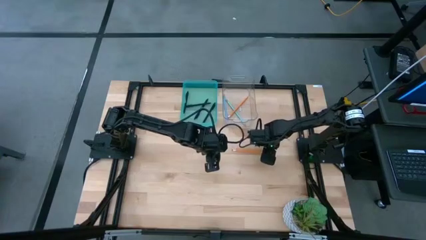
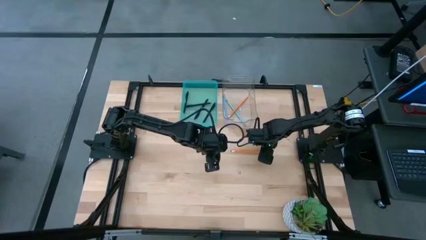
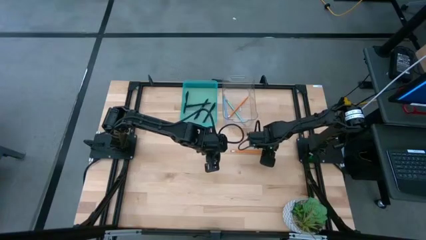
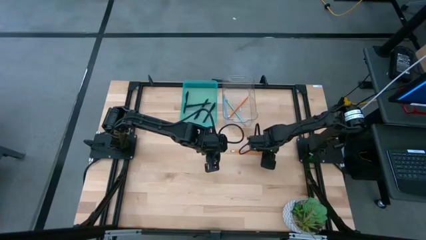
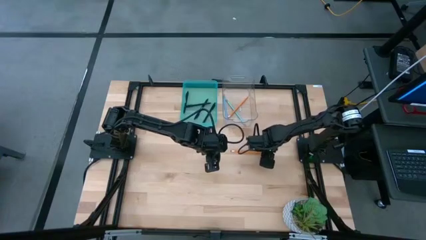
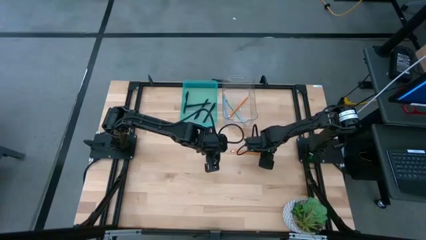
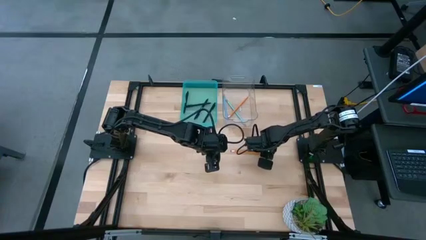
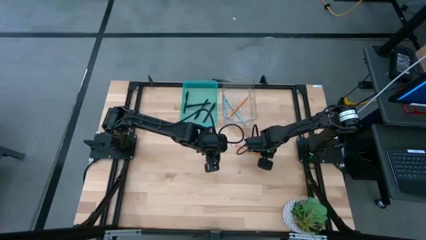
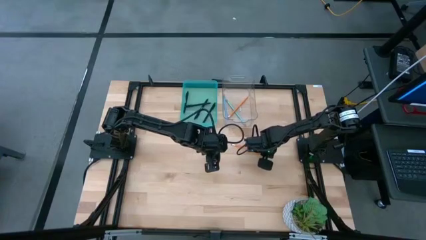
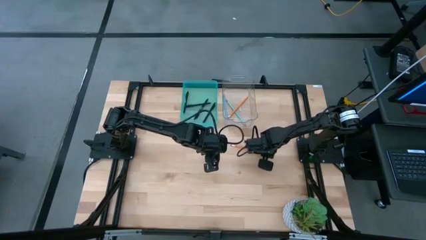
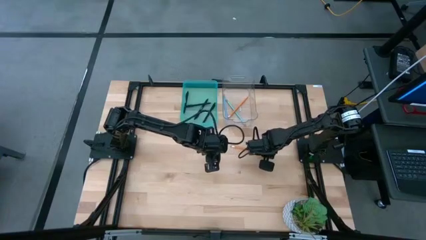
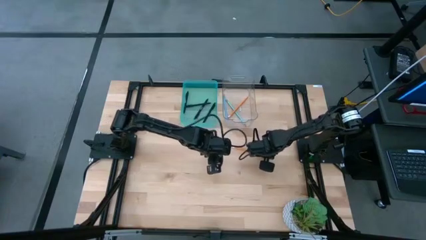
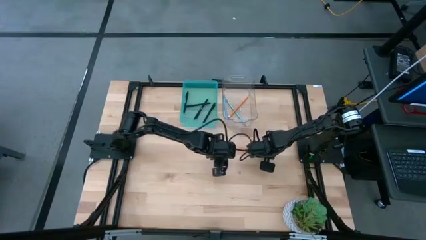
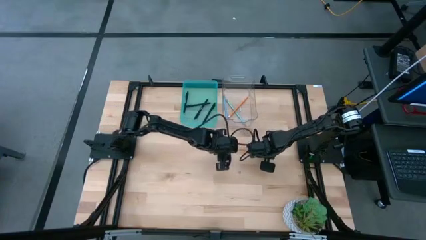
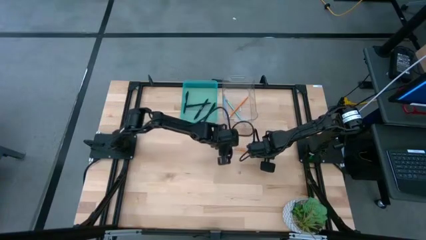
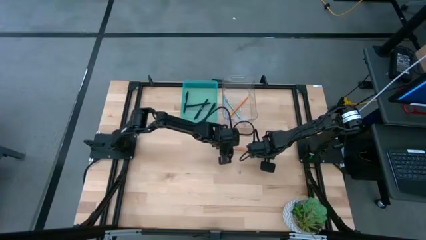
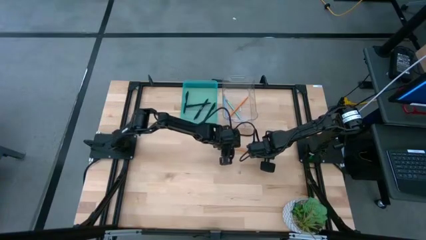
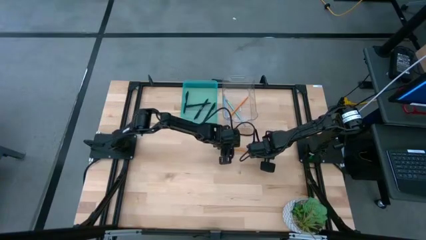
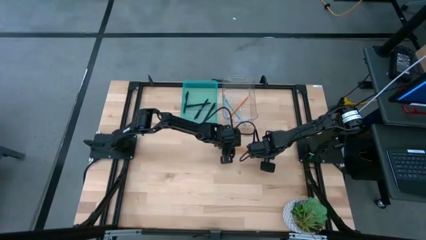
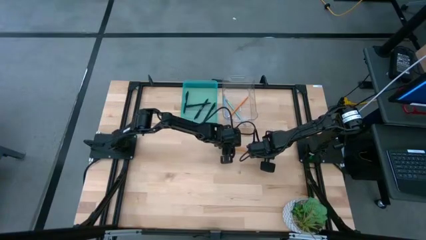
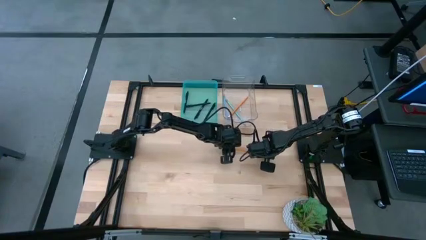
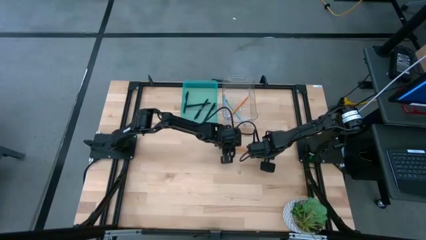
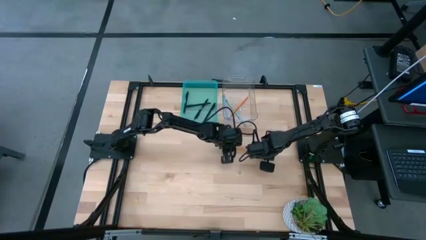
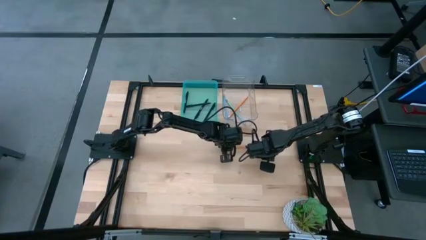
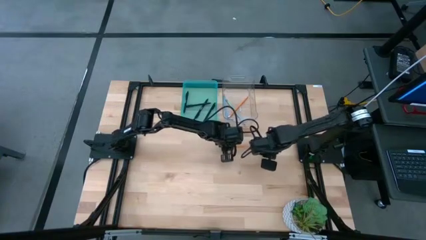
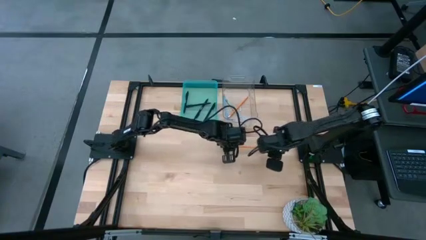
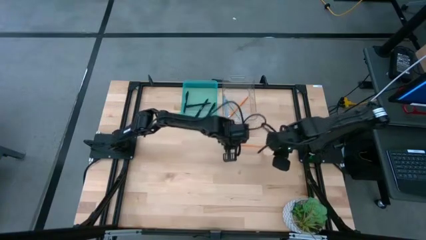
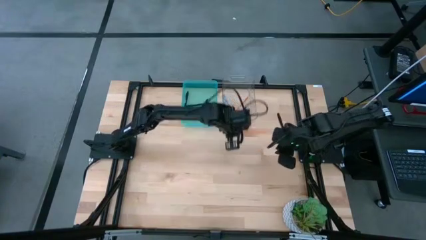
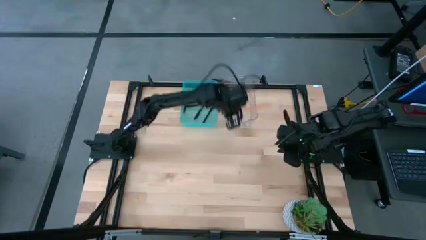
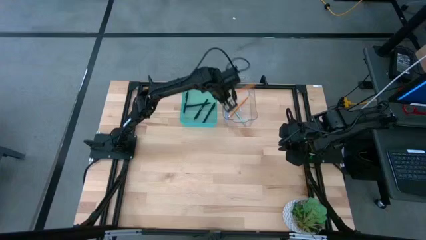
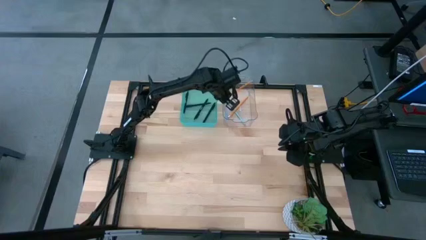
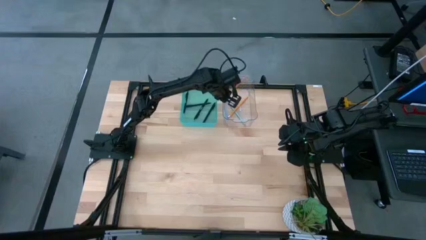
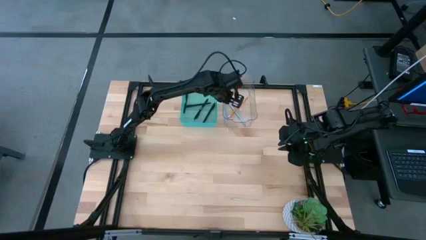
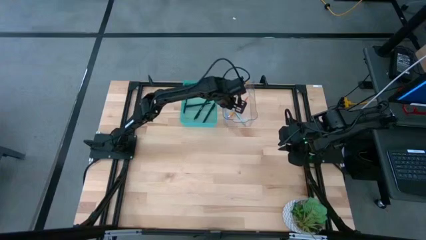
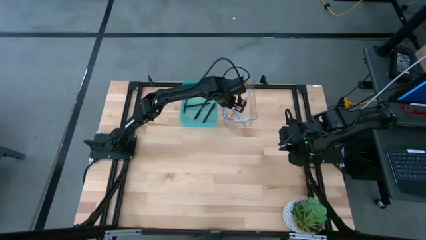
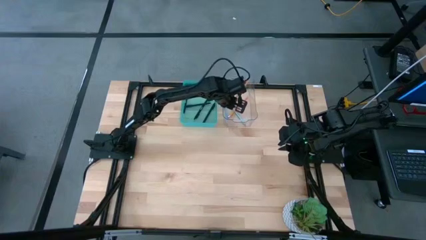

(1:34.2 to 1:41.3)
Task: Sort pens & pencils
Put the yellow pencil into the transparent bin

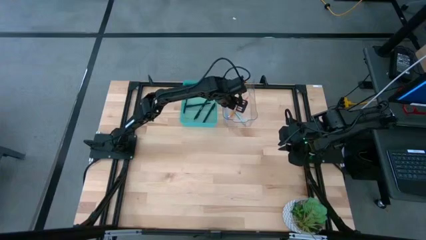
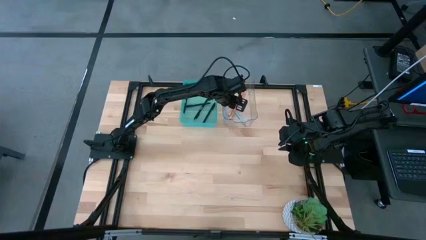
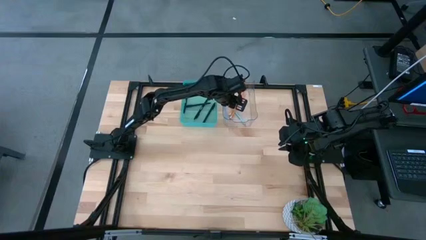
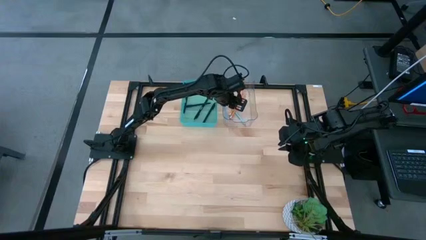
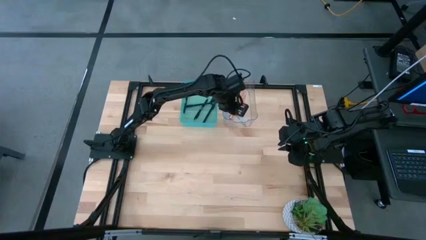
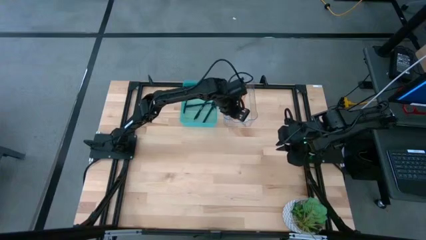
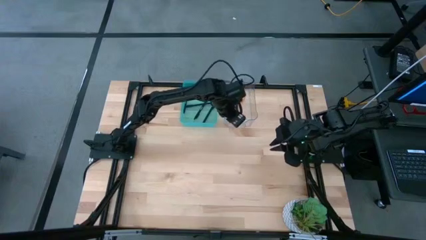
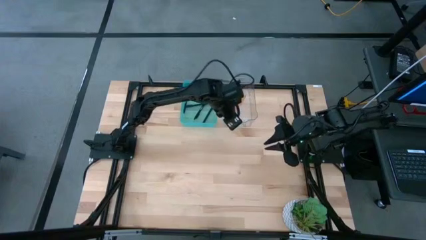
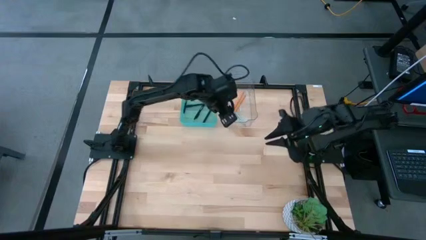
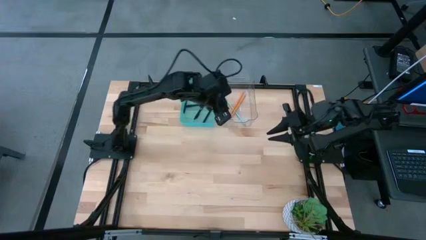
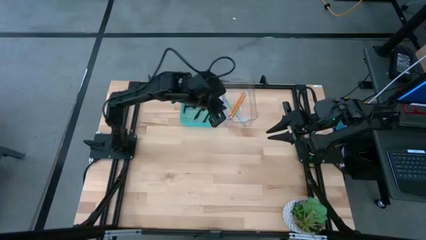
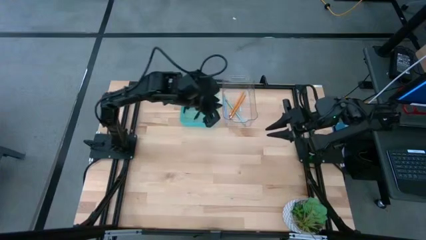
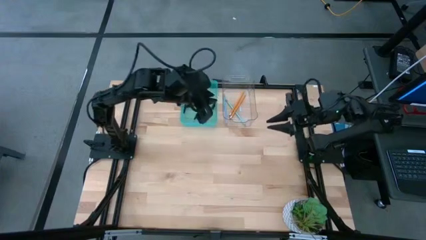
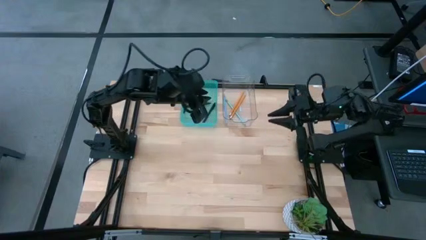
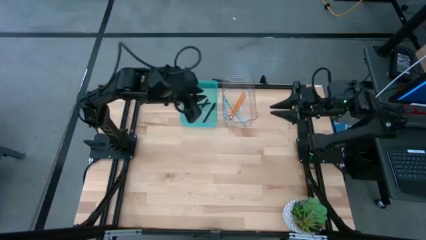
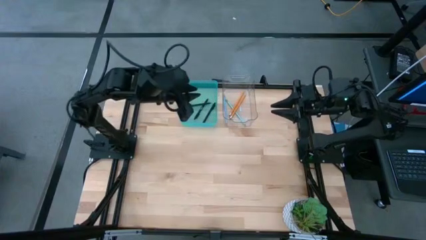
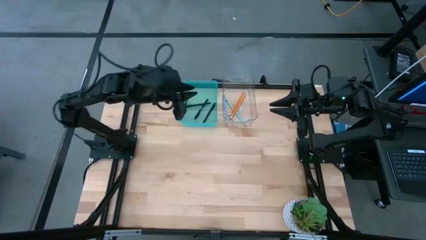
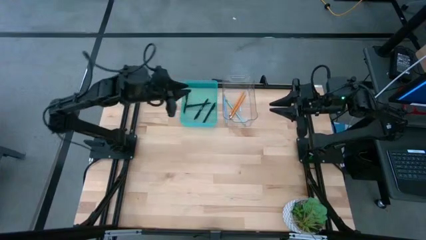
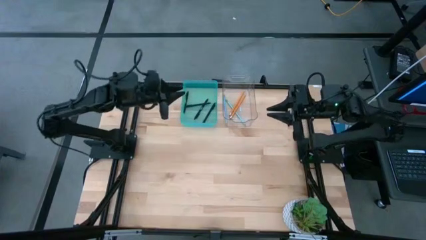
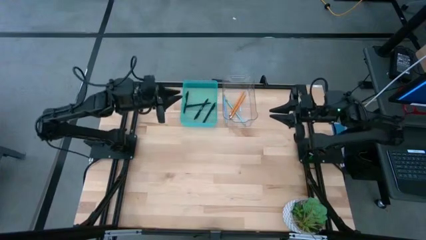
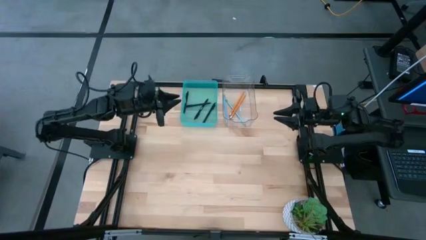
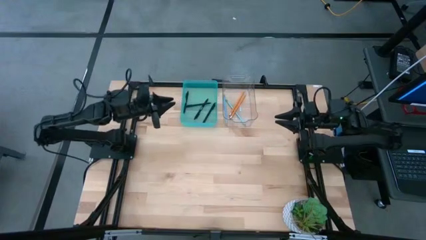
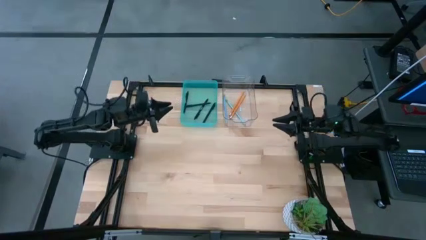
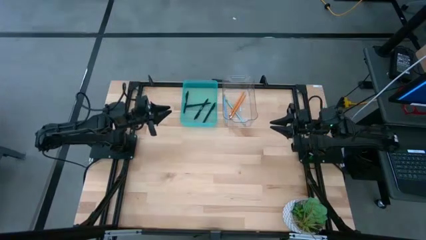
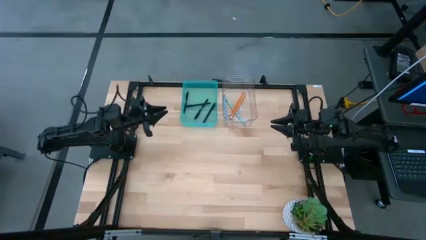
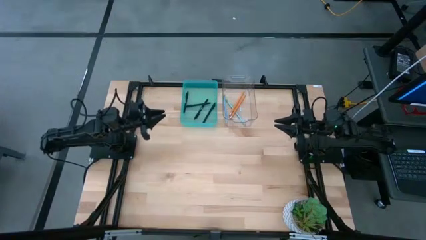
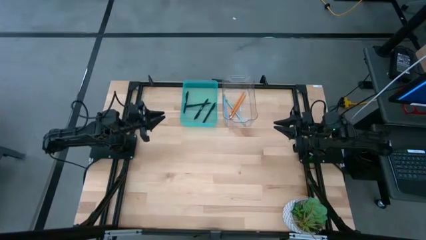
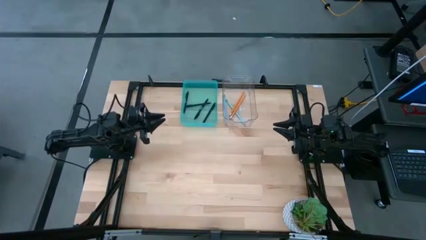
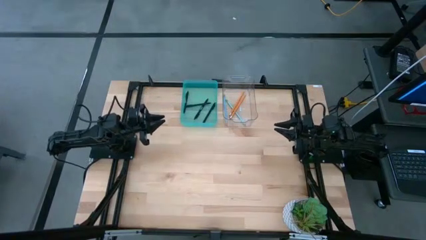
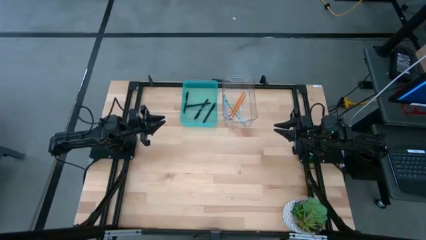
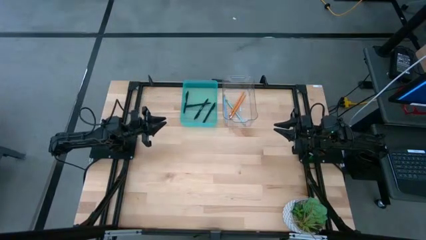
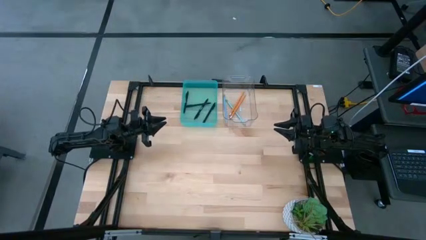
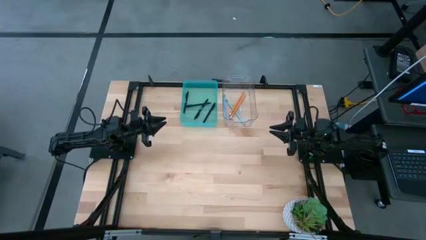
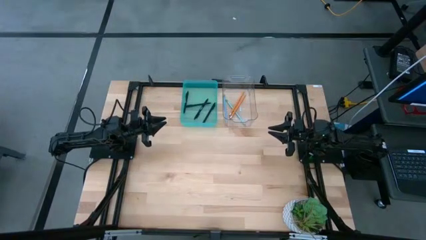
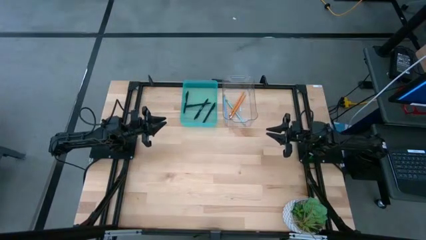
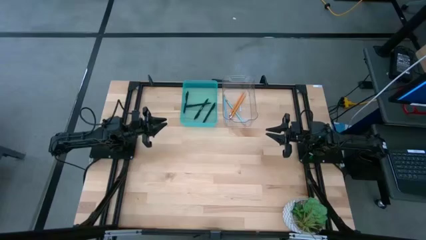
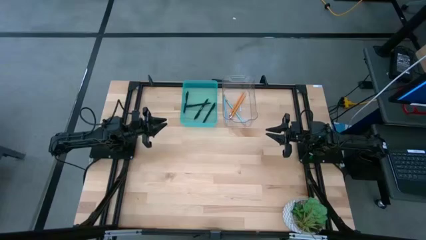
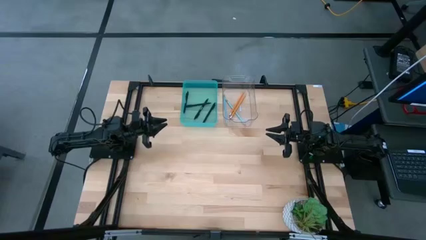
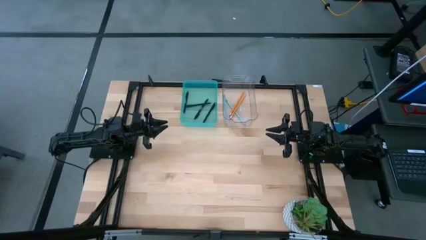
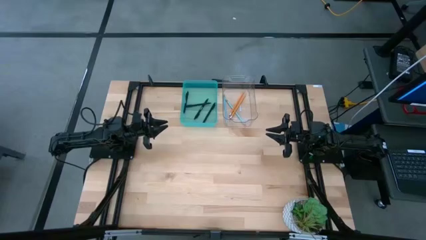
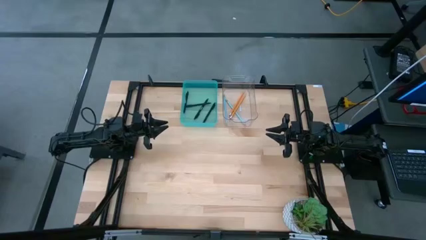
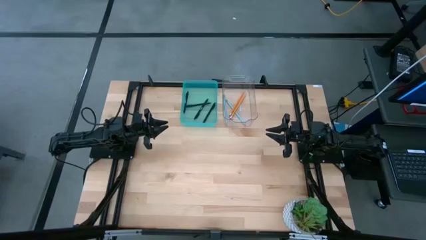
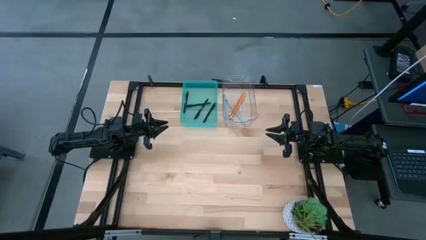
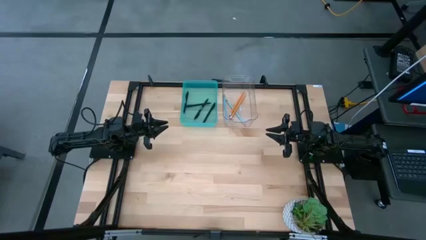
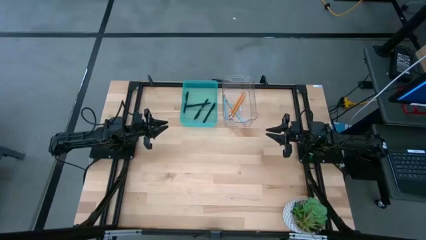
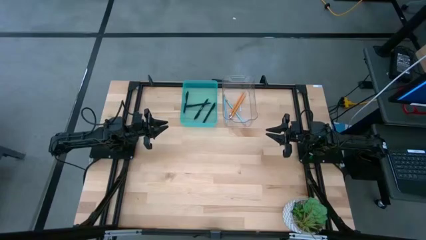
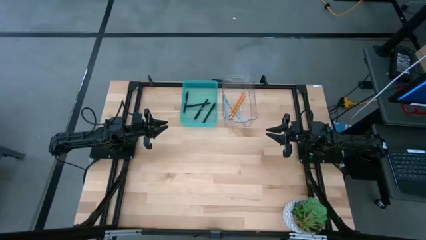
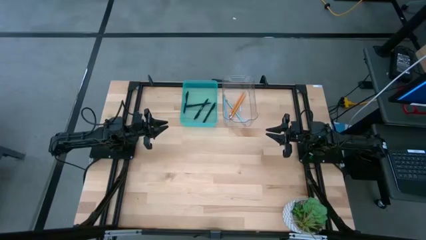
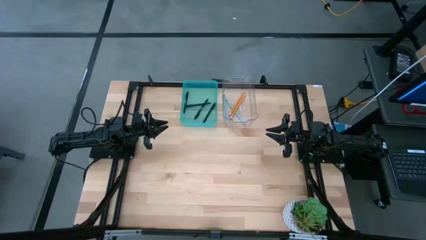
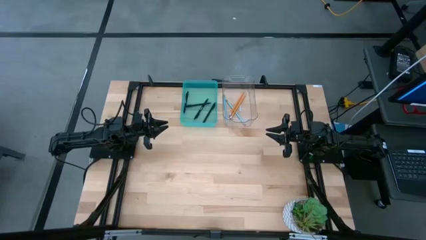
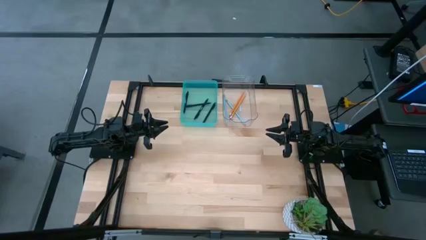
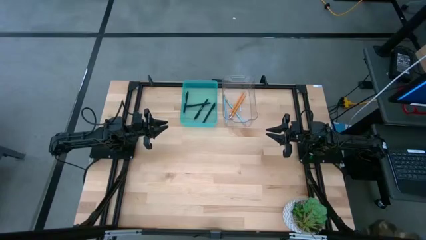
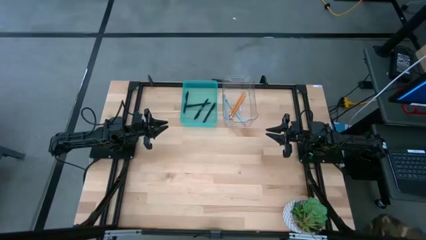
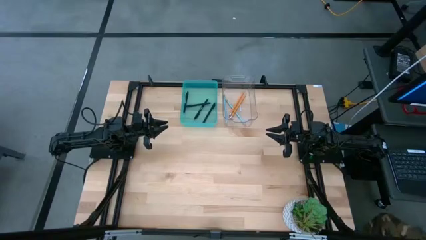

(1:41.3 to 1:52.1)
Return to Home Position
